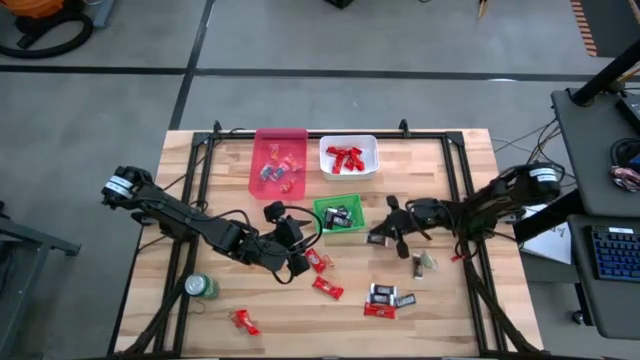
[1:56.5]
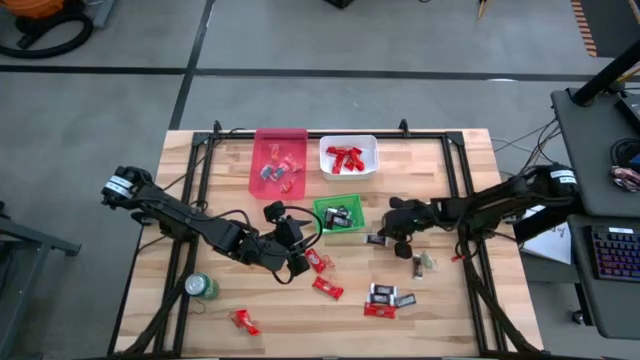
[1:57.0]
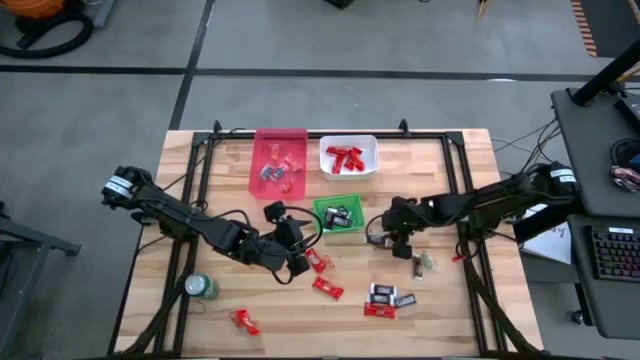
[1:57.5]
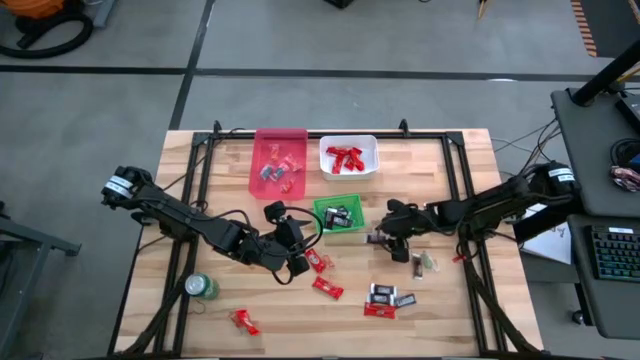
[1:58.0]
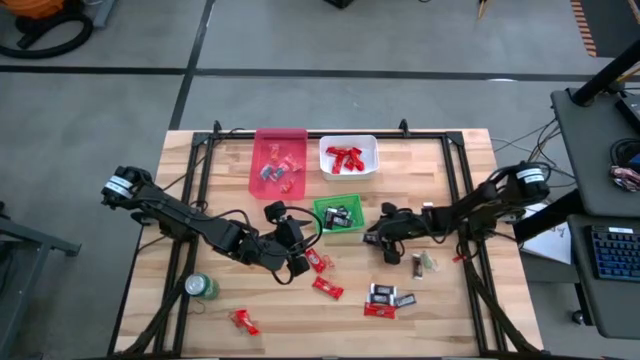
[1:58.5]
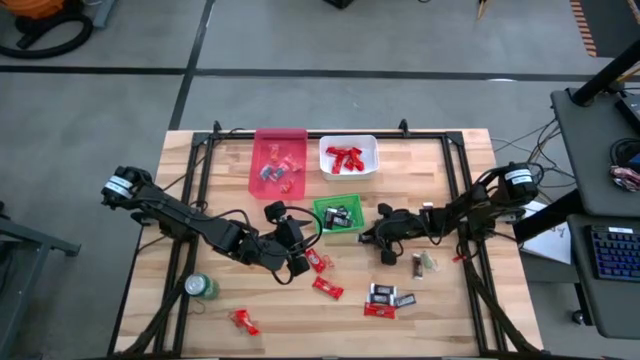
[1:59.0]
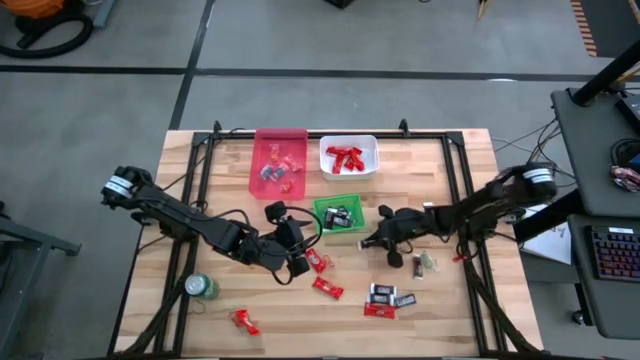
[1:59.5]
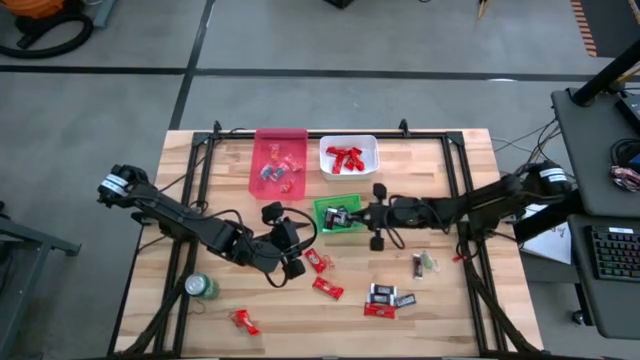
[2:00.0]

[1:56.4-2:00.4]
Task: Sort candy
Put the brown chocolate bar into the green bin

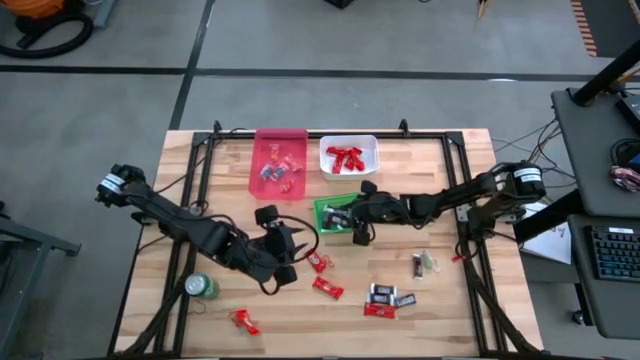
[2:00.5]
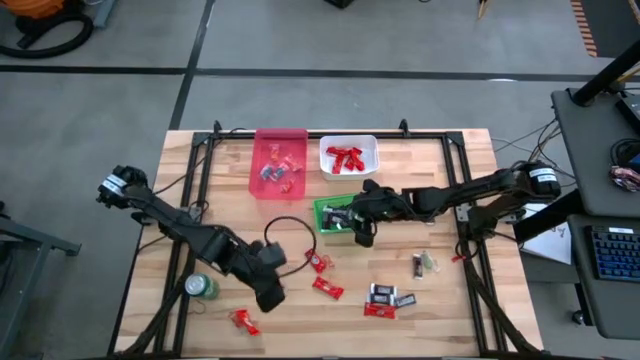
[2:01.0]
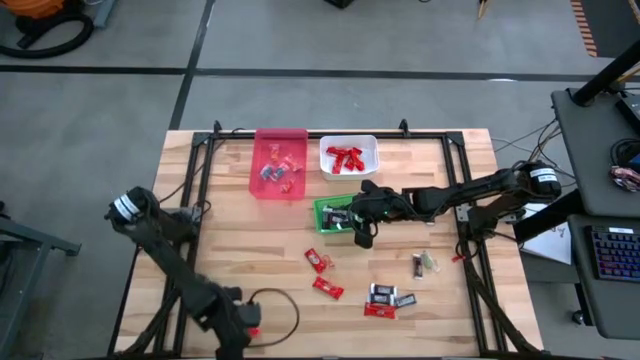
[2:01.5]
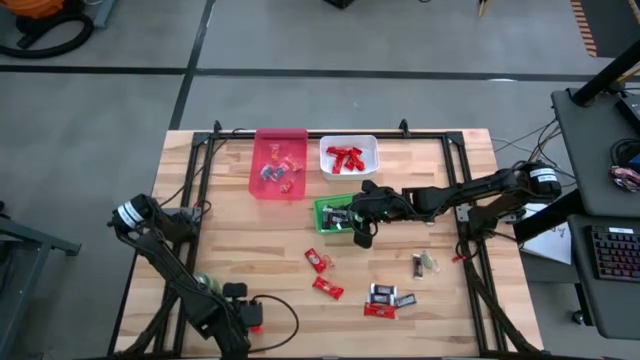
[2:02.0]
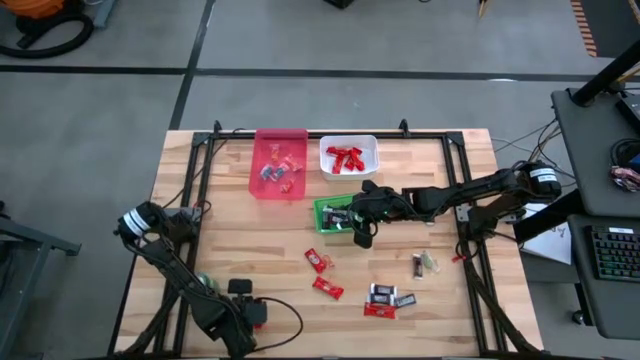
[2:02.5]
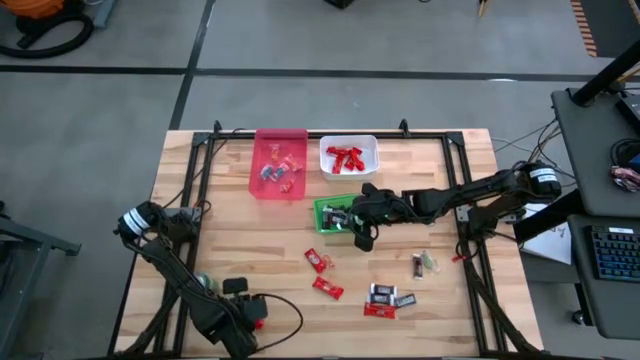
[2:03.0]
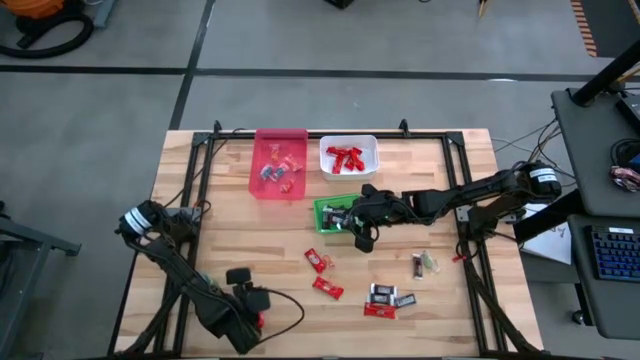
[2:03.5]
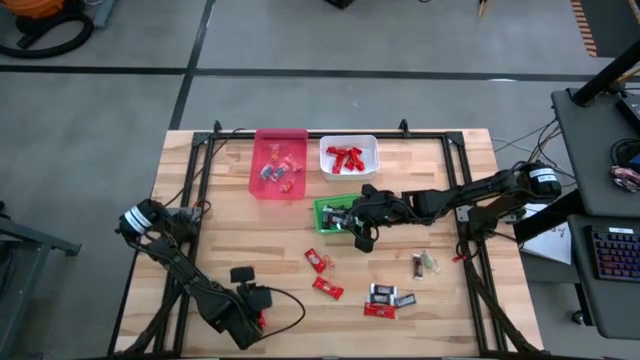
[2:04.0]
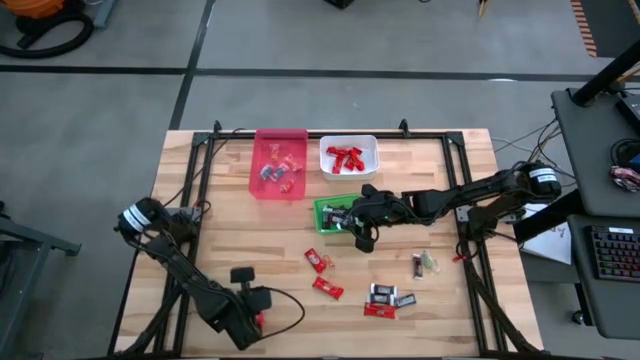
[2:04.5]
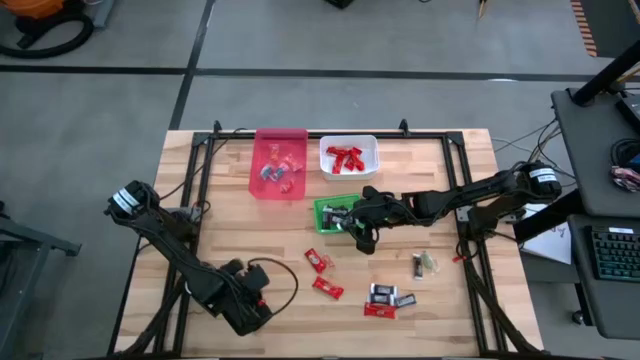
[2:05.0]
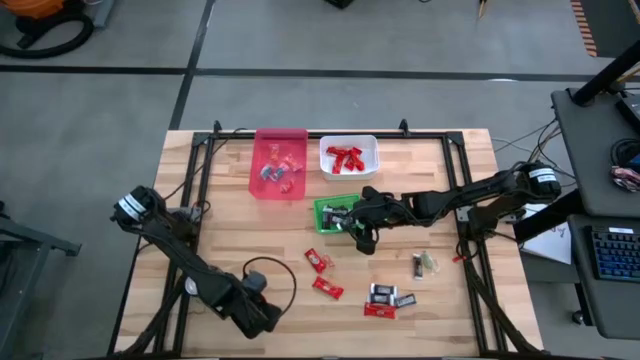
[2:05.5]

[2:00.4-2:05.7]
Put the red chocolate bar into the white bin

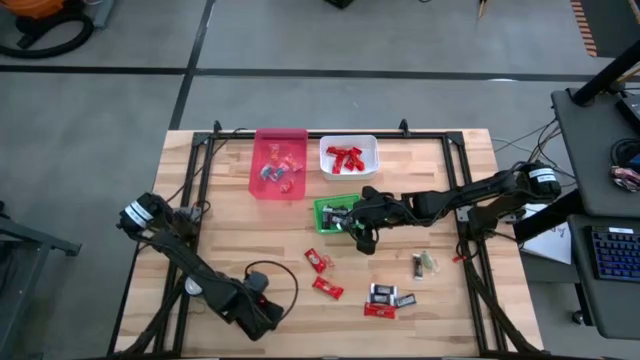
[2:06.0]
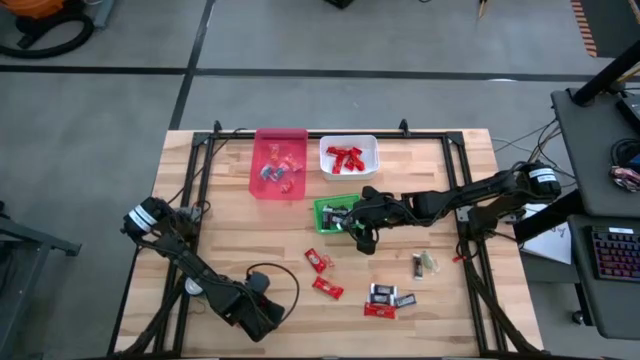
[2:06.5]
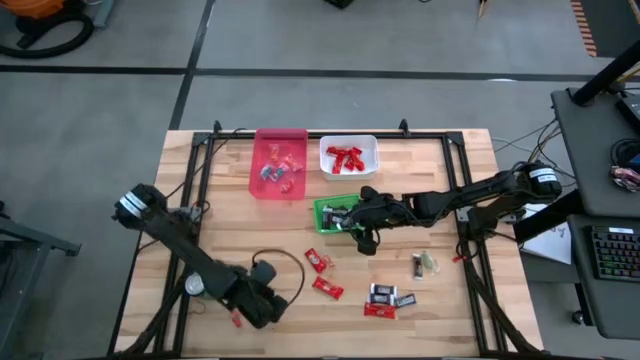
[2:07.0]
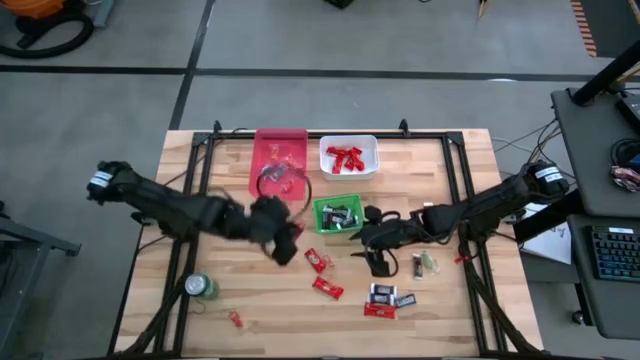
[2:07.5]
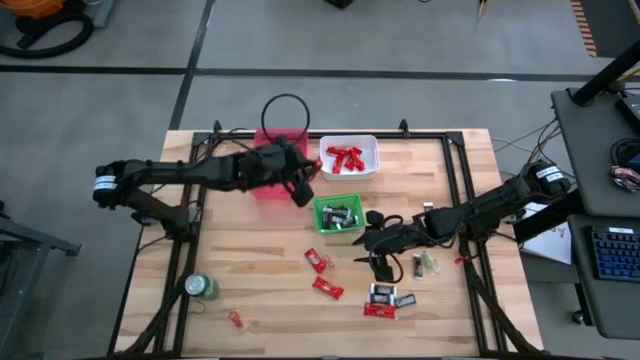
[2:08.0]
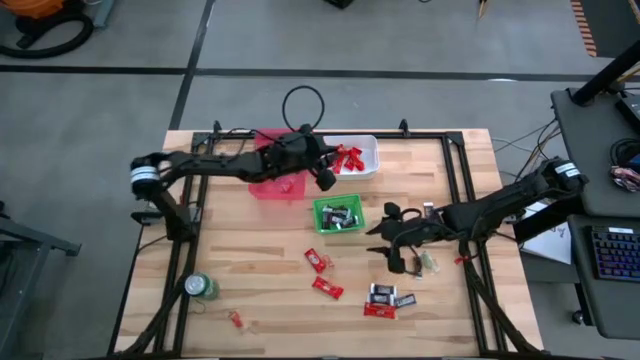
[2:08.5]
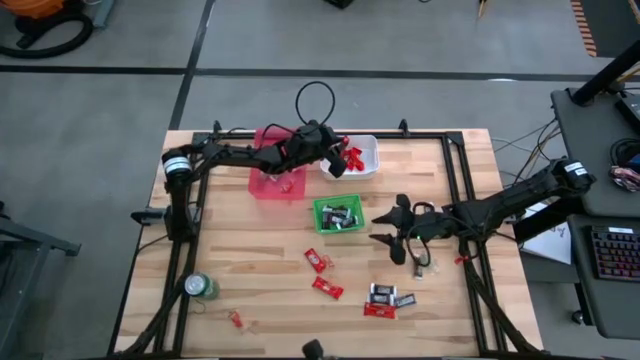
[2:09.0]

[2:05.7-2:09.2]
Put the red chocolate bar into the white bin

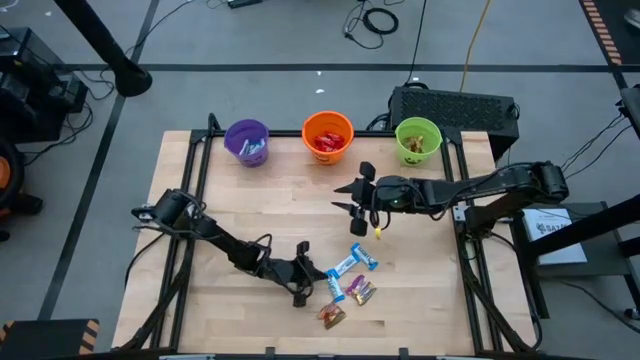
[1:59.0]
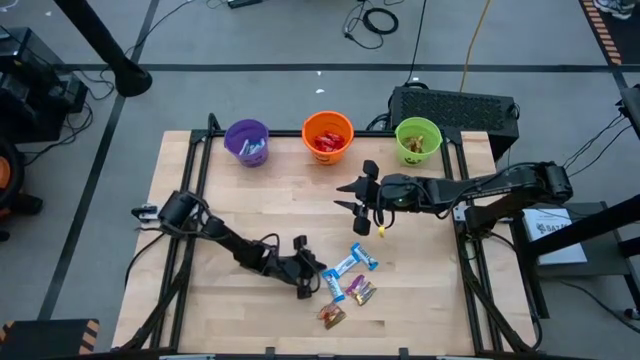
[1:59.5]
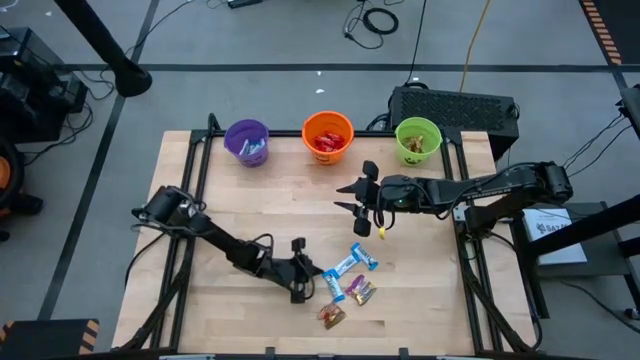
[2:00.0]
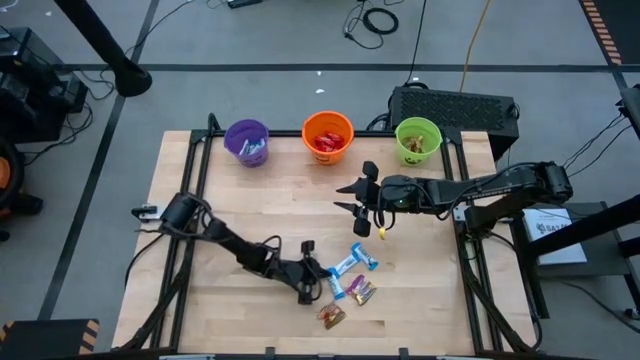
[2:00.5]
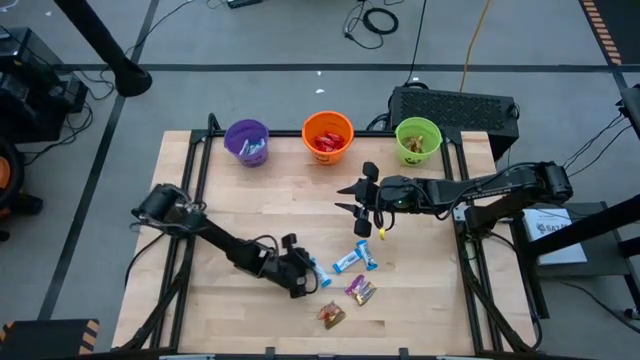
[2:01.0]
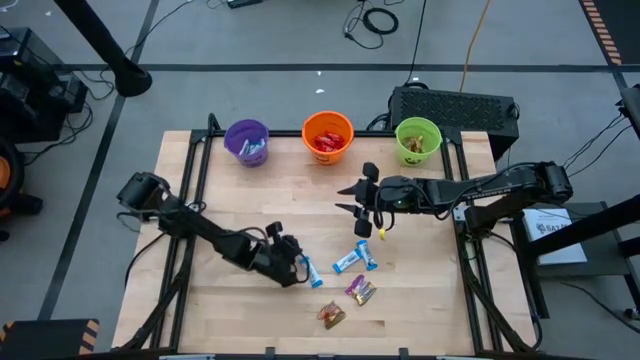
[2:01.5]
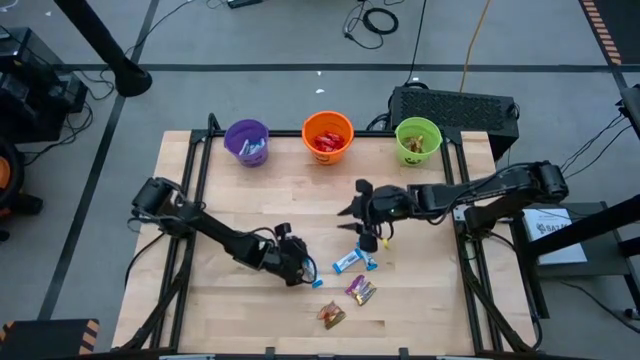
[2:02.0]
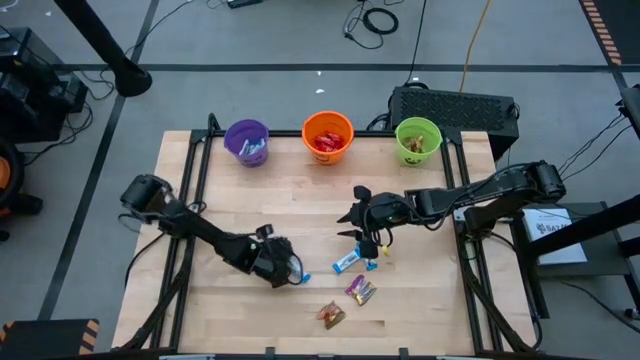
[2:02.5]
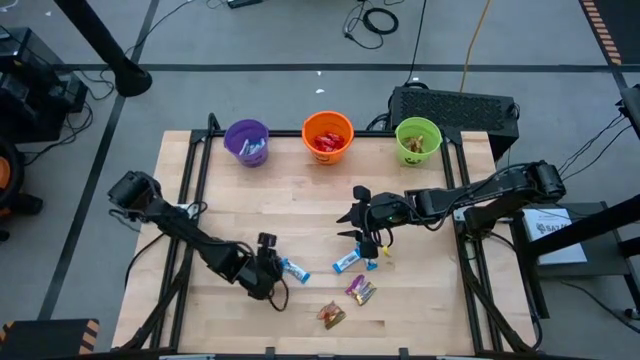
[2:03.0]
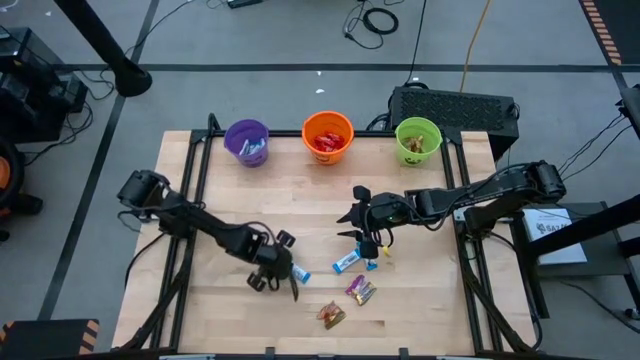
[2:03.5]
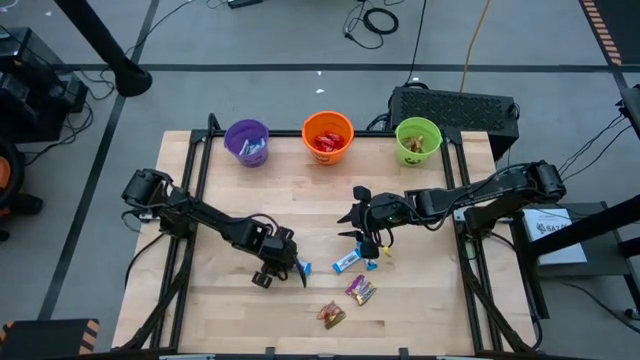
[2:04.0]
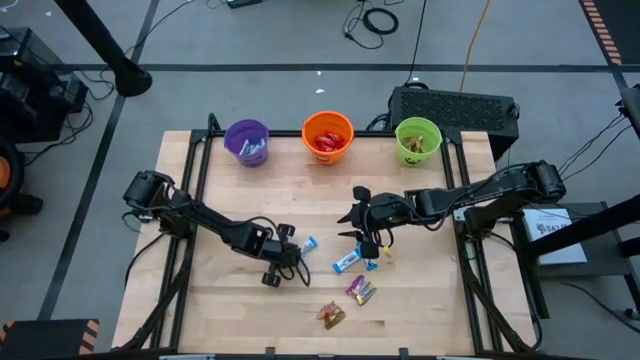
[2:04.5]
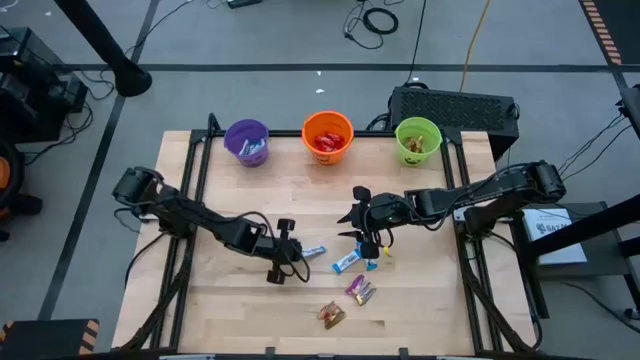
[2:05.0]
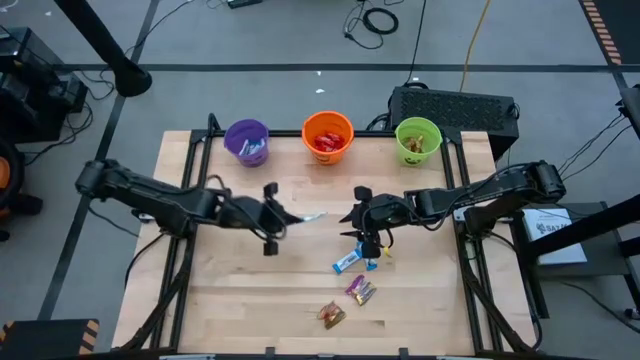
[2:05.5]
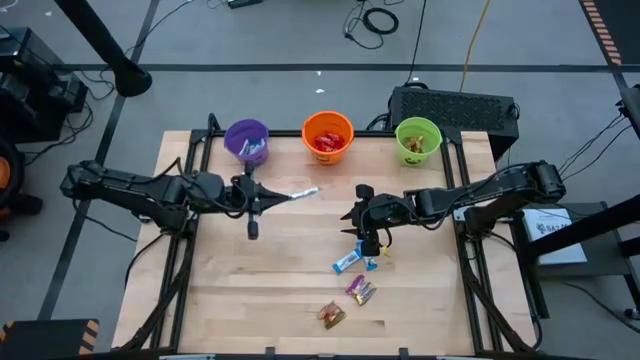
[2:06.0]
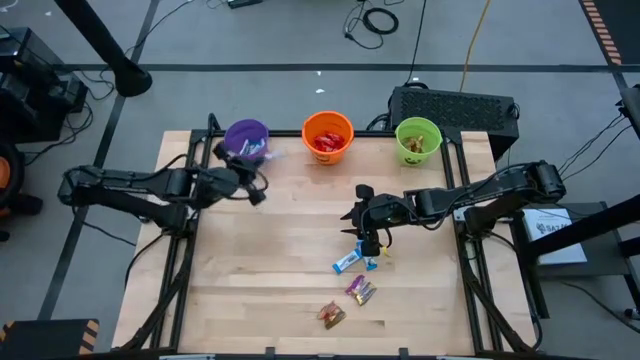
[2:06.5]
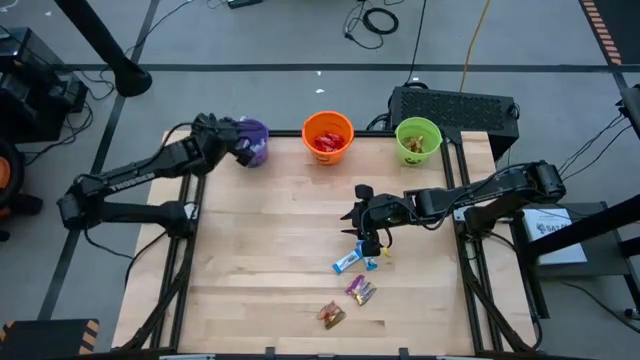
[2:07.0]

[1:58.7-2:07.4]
Task: Sort candy by brand, put in halloween buckets
Put the white chocolate into the purple bucket
